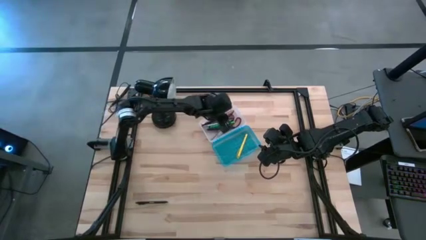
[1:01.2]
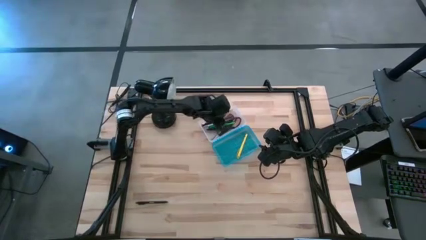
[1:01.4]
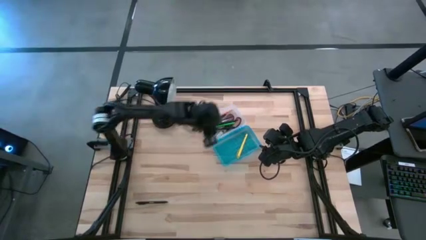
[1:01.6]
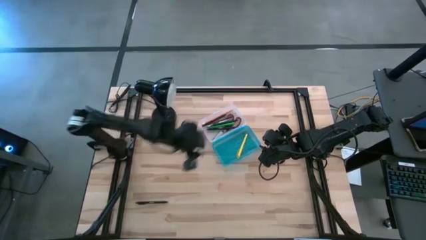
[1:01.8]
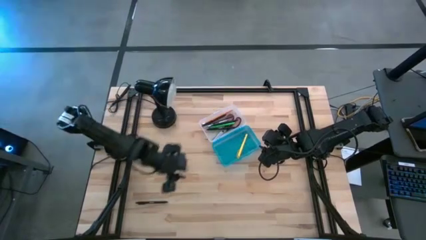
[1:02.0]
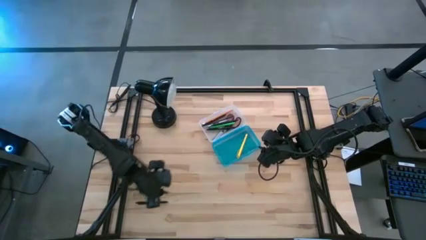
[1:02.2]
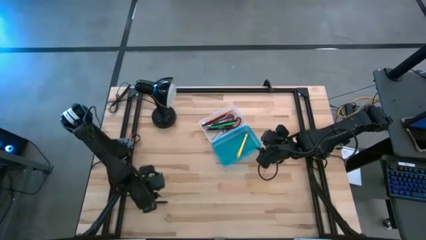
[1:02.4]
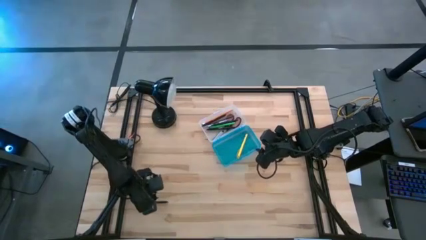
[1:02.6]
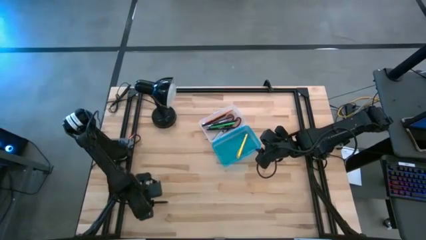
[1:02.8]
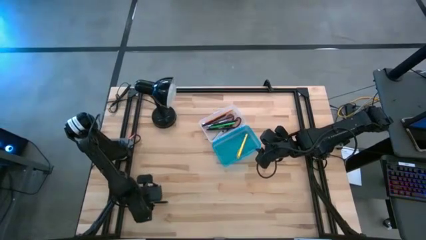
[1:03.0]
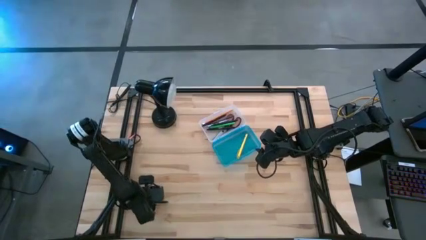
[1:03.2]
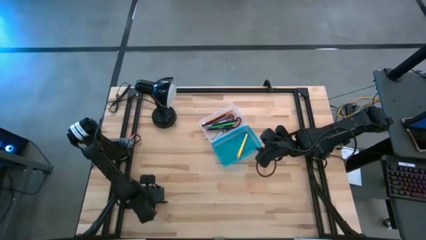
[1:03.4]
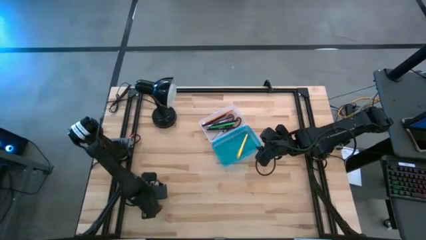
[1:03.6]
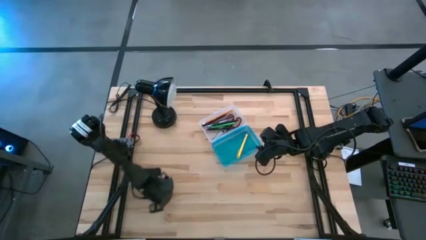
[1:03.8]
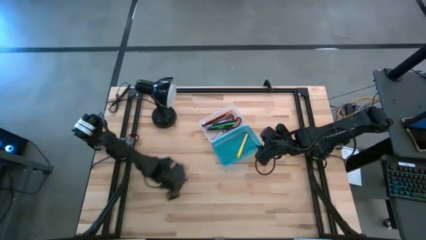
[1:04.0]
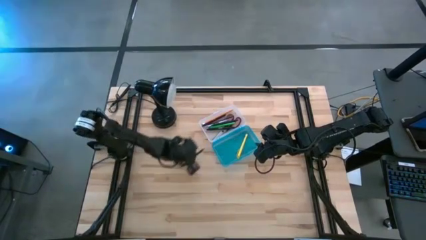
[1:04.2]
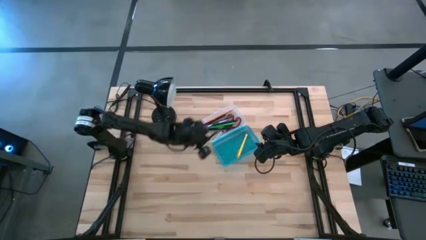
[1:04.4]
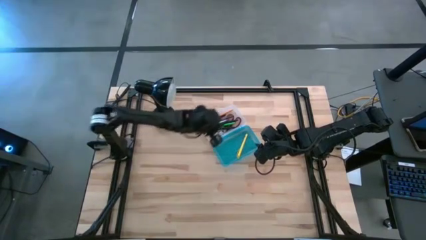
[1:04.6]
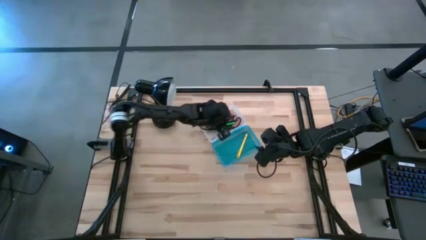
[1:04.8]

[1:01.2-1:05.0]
Task: Pick & place school supplies into a supply box
Put the black pen into the supply box

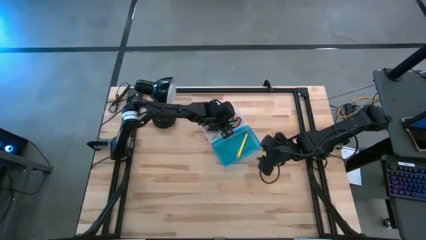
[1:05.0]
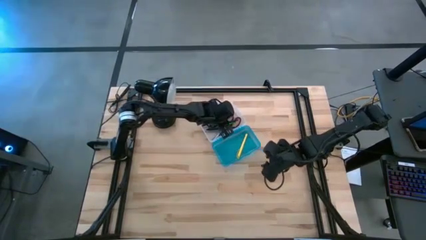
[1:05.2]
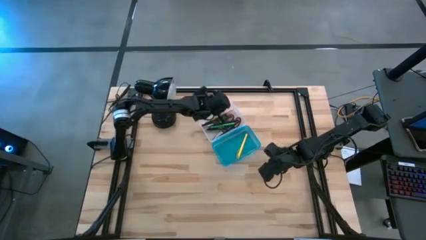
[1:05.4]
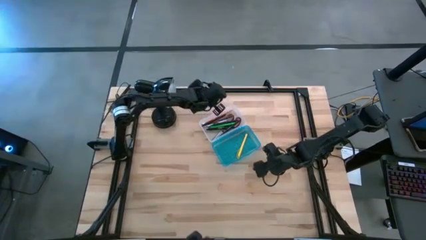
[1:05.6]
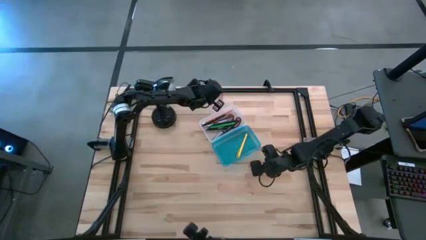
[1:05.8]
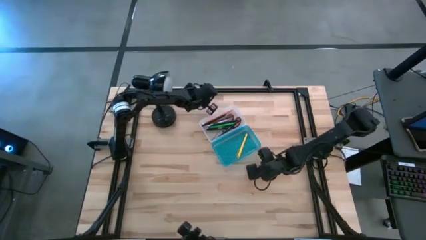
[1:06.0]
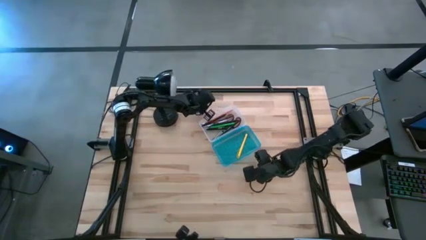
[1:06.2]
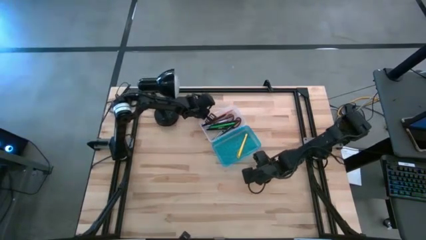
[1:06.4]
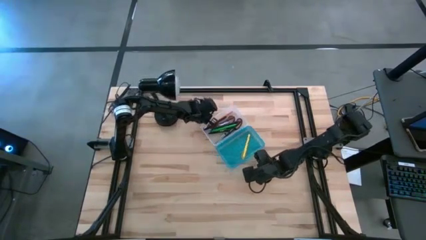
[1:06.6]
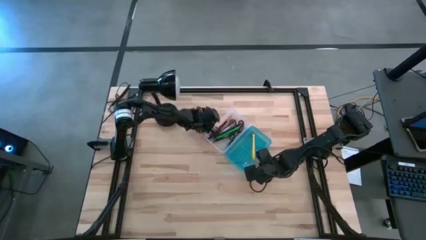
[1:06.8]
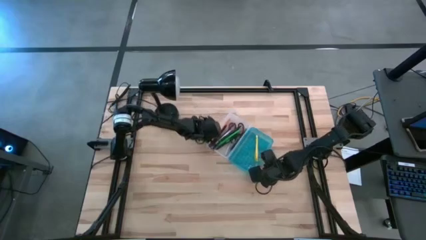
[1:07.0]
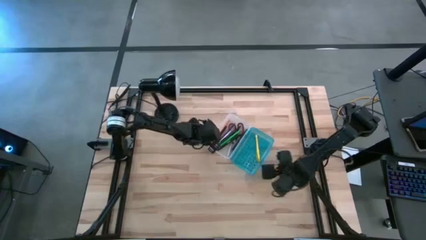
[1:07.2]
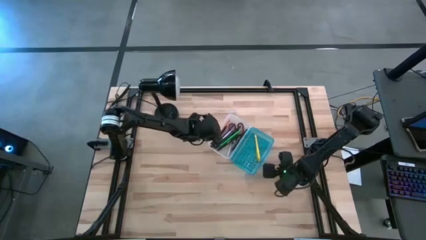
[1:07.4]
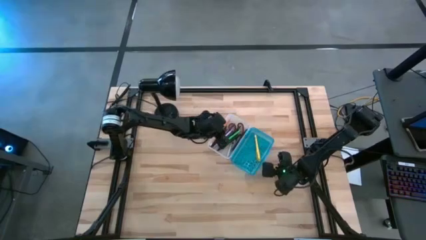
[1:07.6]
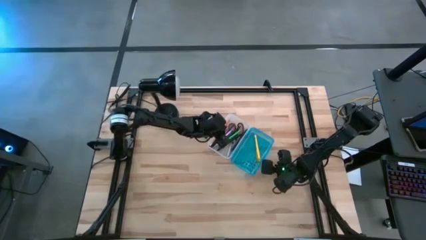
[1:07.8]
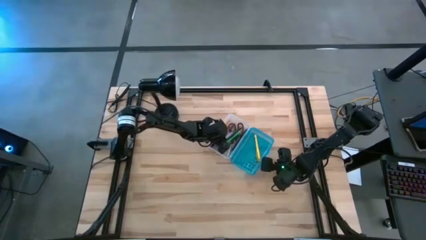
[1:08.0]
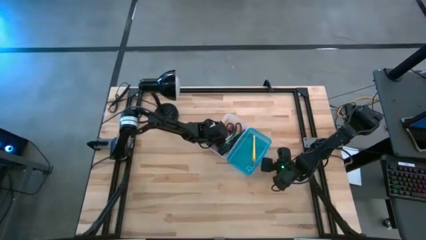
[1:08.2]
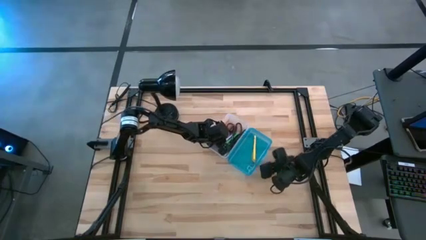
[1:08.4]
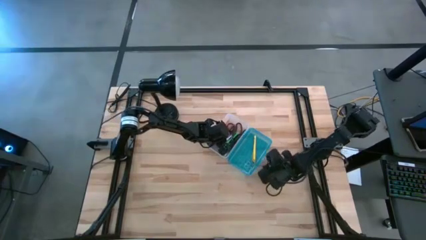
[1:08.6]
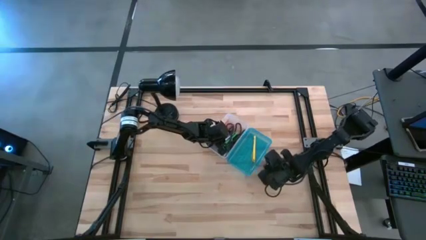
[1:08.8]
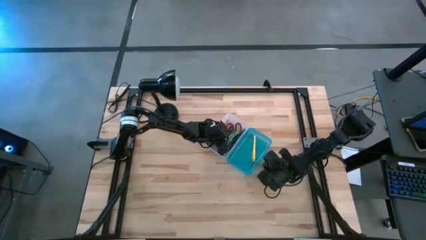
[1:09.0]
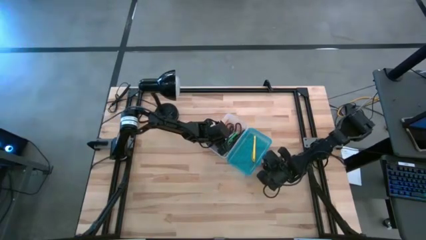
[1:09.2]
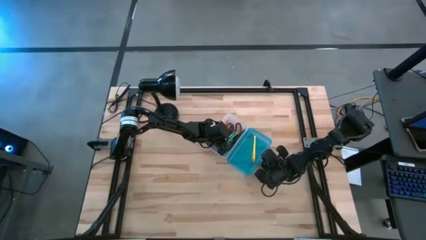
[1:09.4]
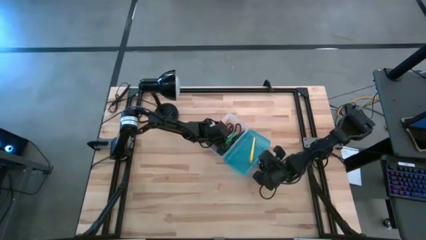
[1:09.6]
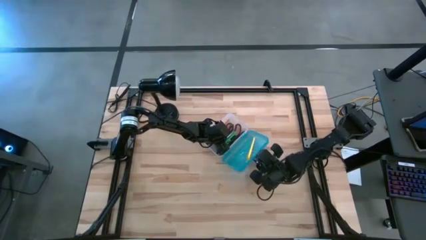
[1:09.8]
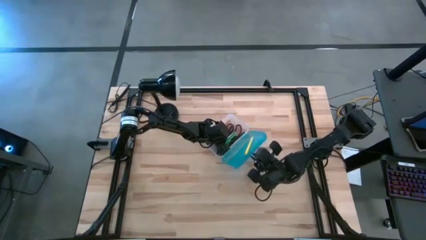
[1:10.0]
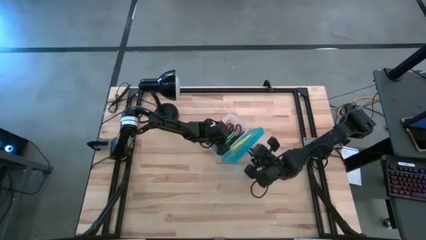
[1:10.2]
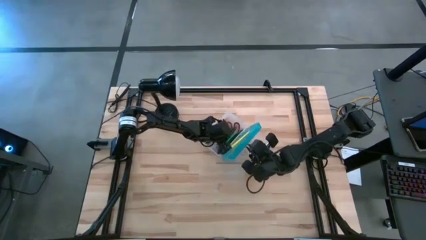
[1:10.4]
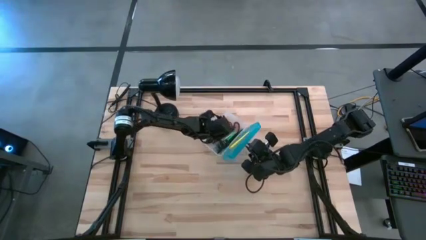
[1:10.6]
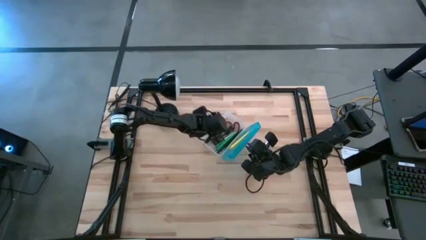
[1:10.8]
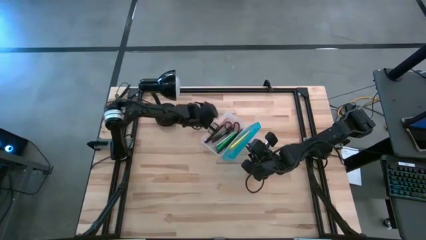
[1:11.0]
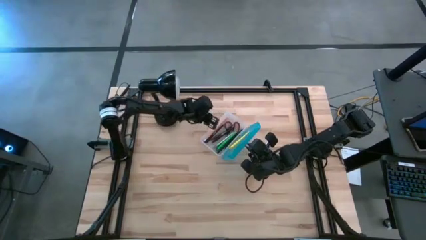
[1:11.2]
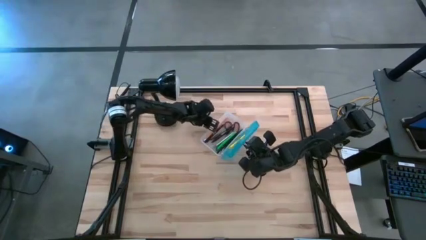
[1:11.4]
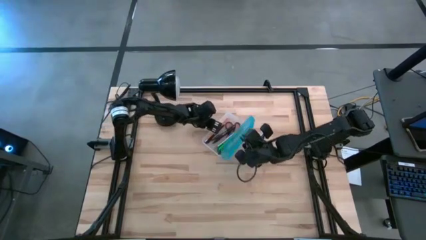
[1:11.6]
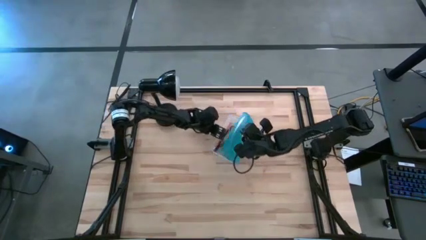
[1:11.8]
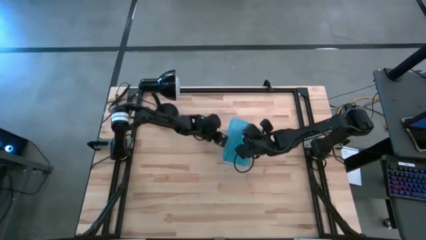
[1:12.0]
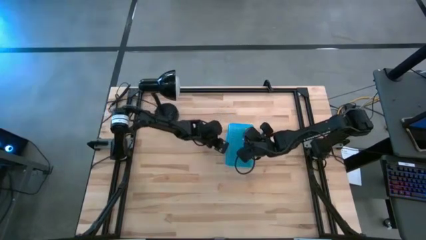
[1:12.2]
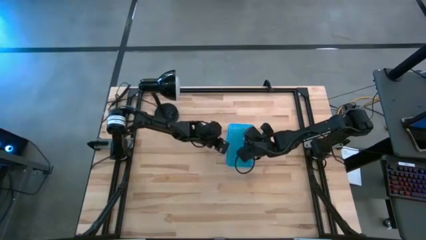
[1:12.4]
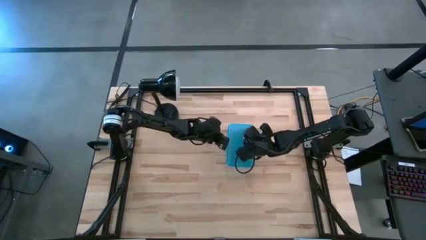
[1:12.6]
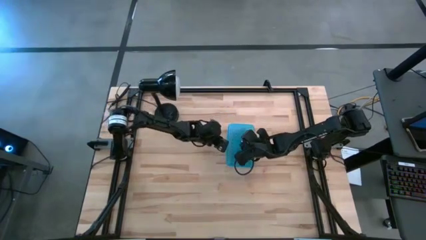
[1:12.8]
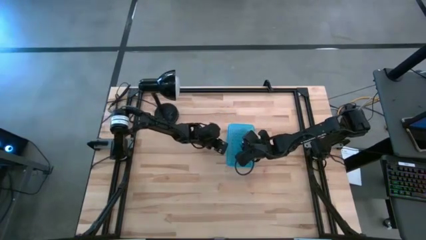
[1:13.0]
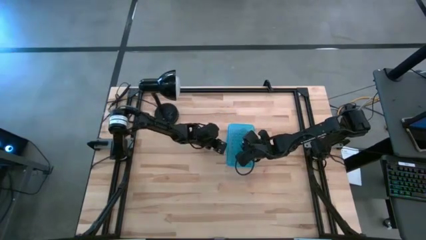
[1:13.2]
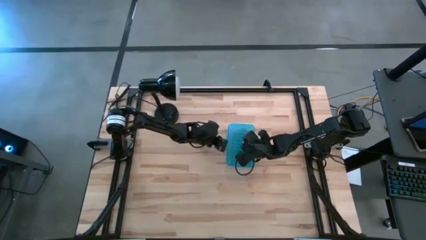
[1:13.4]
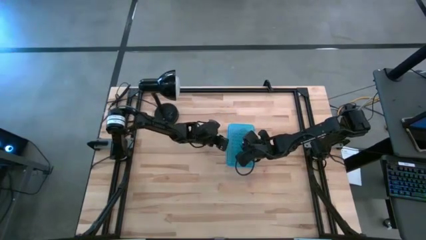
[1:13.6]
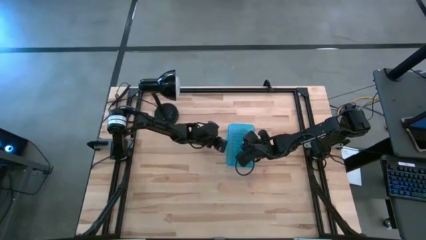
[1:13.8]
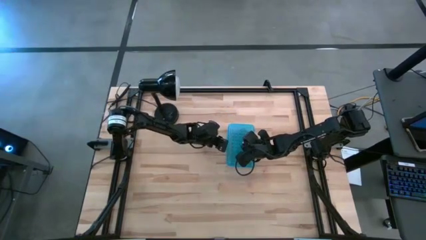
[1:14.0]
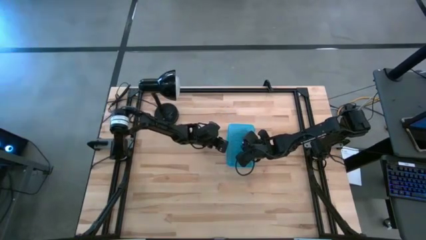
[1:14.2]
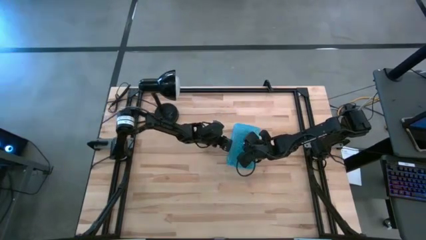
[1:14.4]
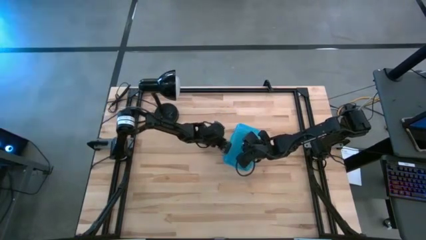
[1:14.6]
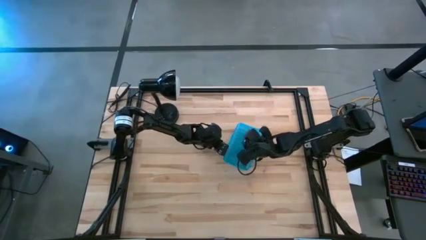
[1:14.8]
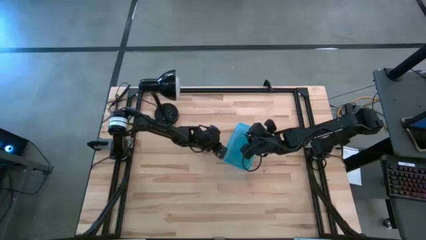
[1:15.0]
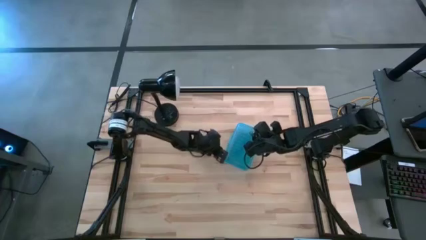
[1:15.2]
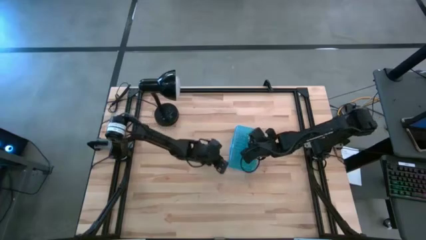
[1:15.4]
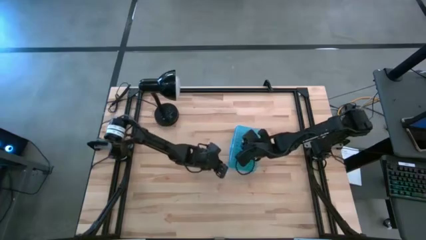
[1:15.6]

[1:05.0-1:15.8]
Close the supply box

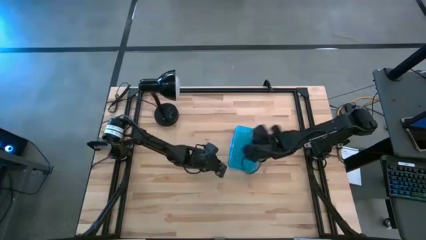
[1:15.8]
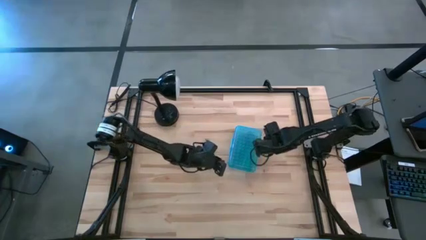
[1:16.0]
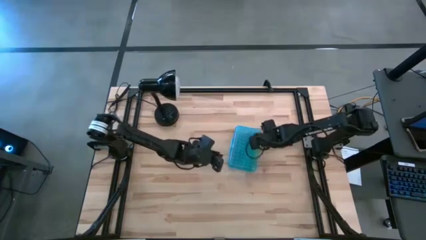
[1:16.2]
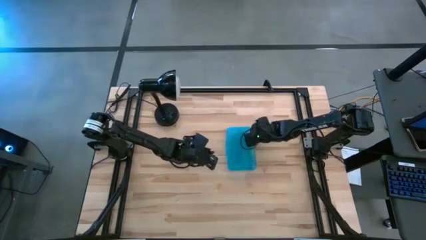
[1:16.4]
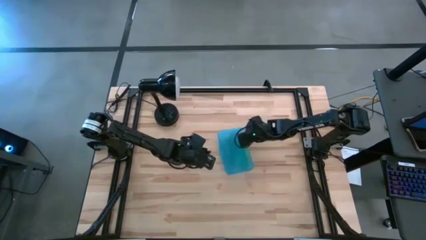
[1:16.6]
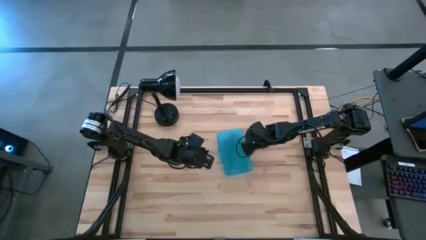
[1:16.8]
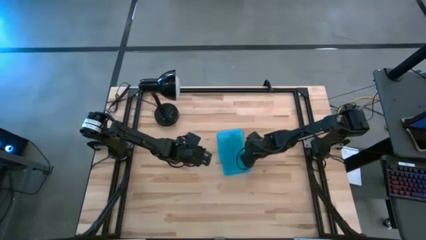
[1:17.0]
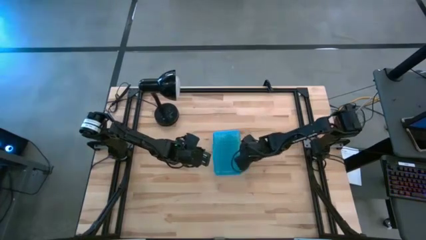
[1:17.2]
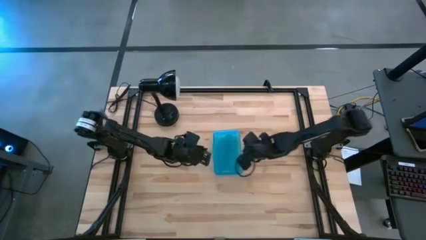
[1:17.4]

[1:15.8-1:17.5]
Adjust the supply box on the table
